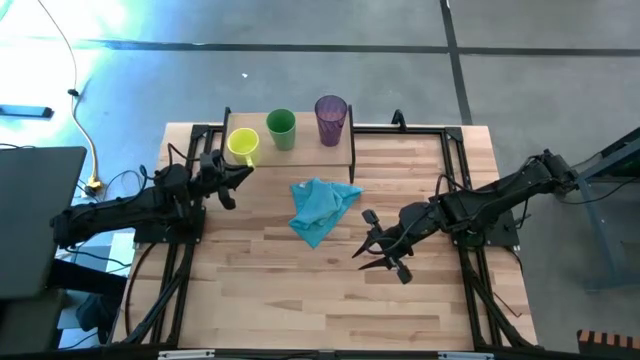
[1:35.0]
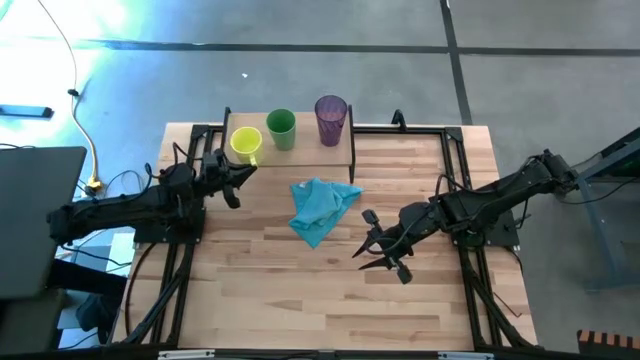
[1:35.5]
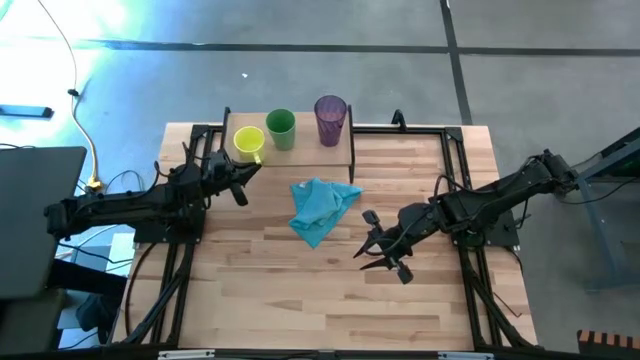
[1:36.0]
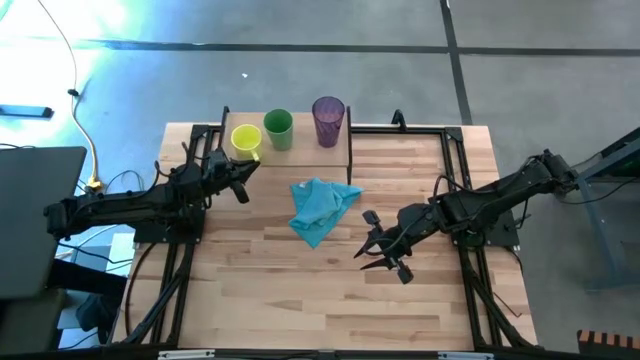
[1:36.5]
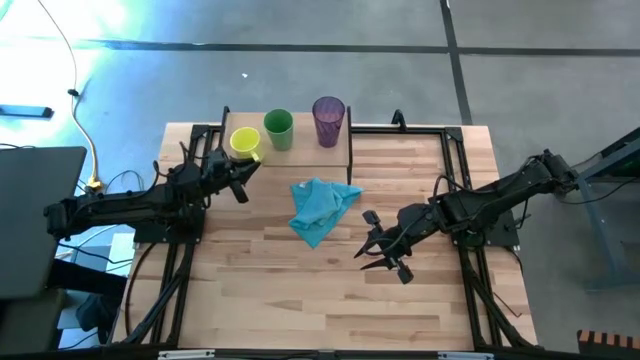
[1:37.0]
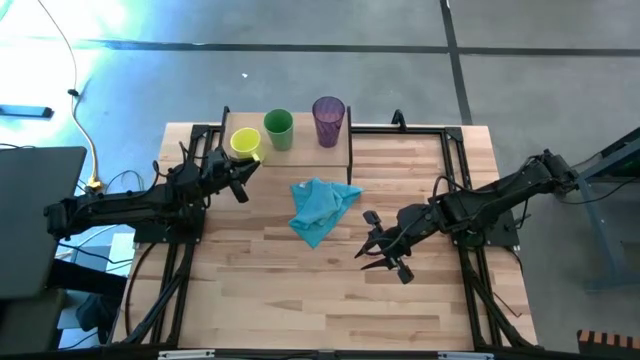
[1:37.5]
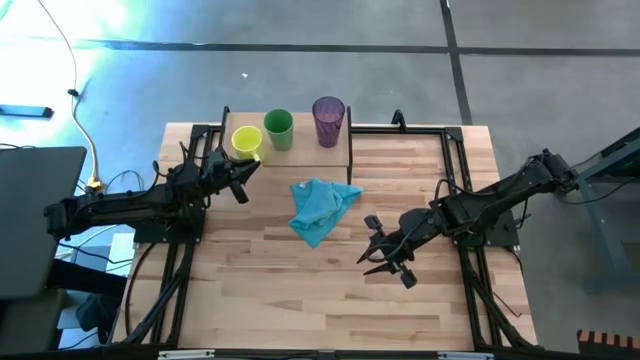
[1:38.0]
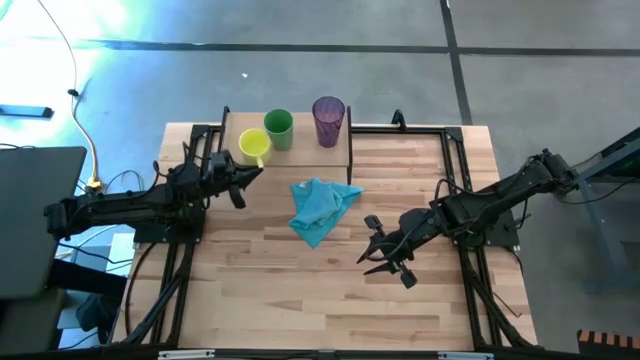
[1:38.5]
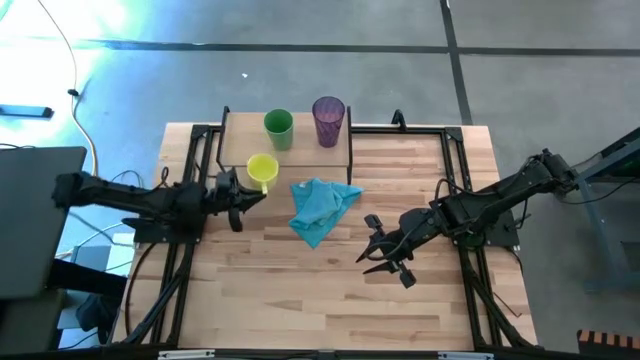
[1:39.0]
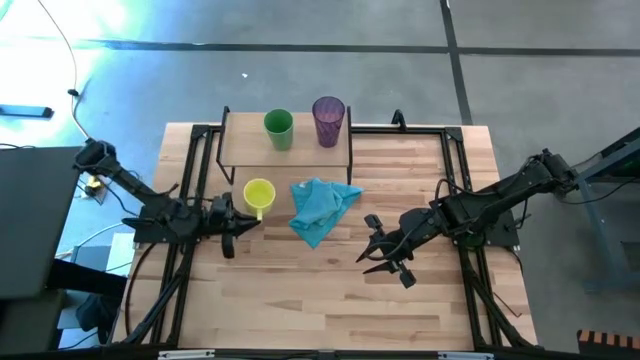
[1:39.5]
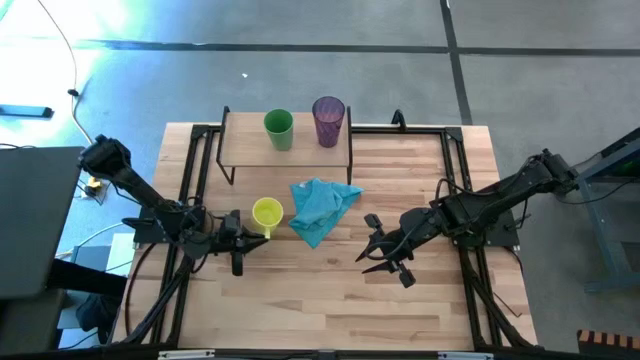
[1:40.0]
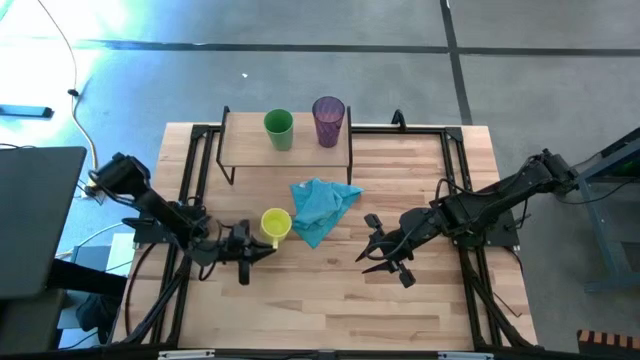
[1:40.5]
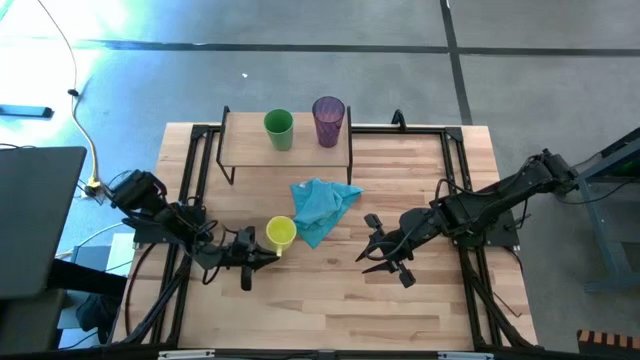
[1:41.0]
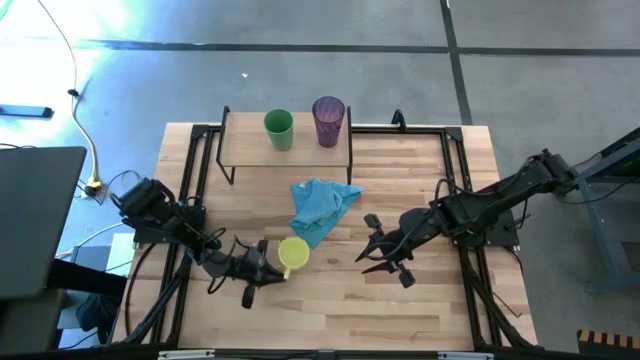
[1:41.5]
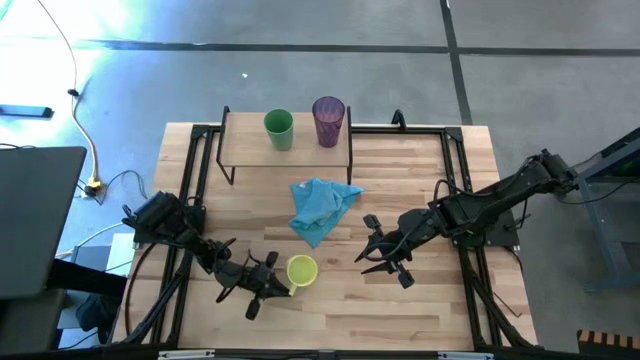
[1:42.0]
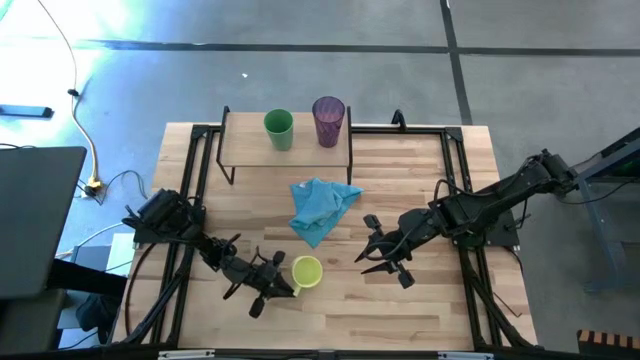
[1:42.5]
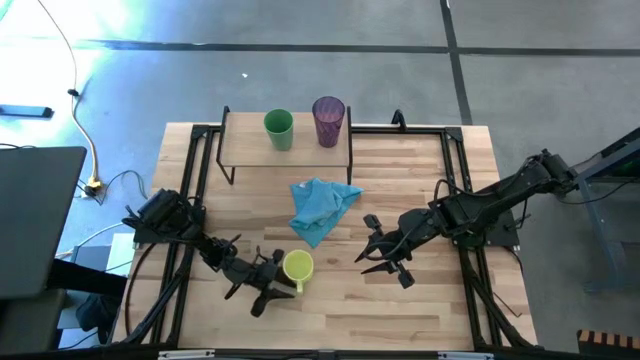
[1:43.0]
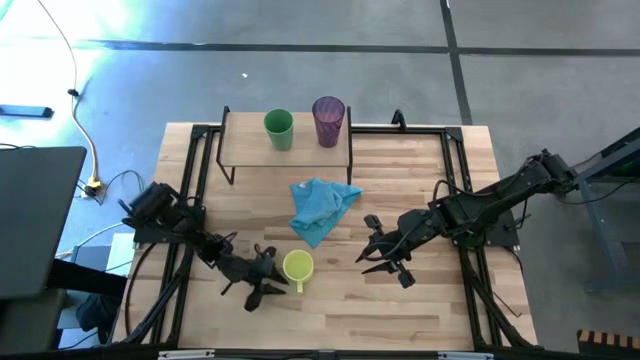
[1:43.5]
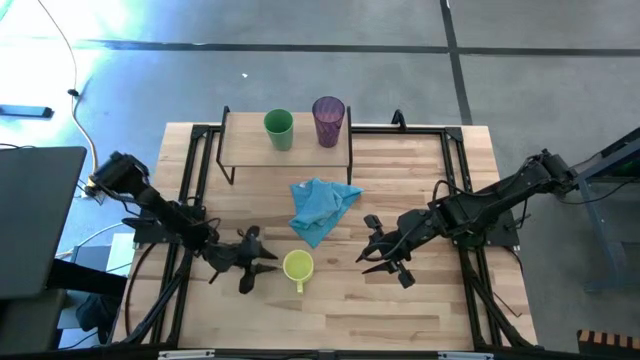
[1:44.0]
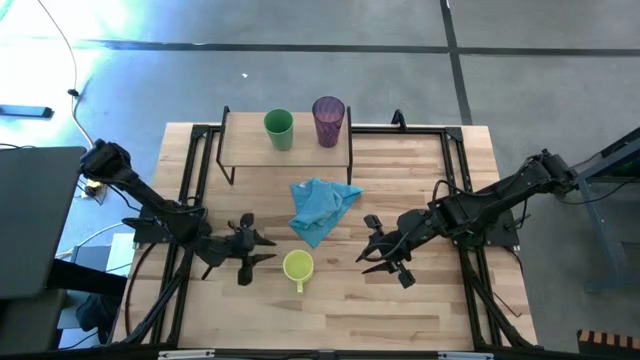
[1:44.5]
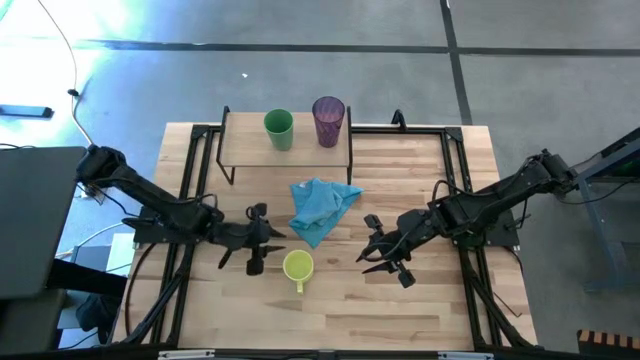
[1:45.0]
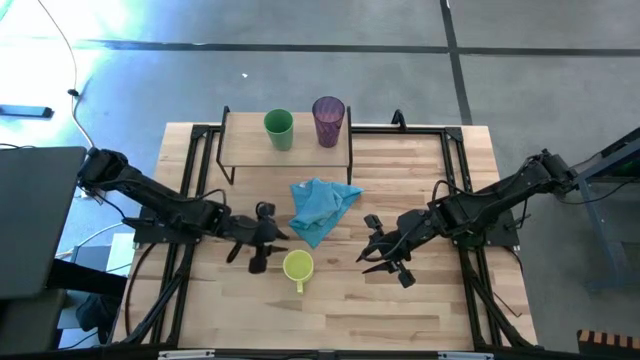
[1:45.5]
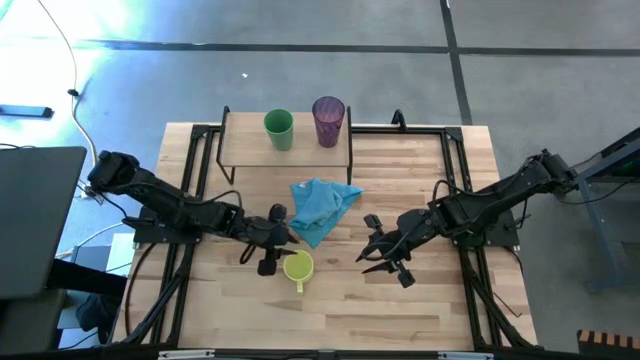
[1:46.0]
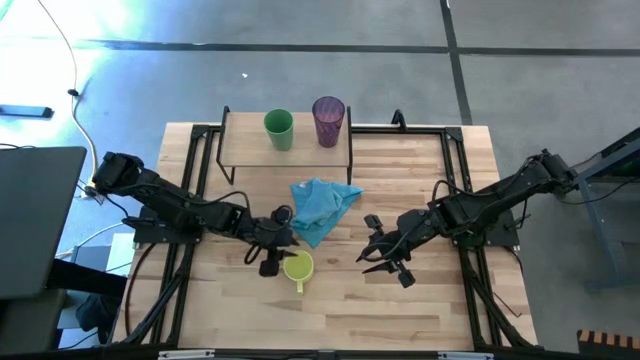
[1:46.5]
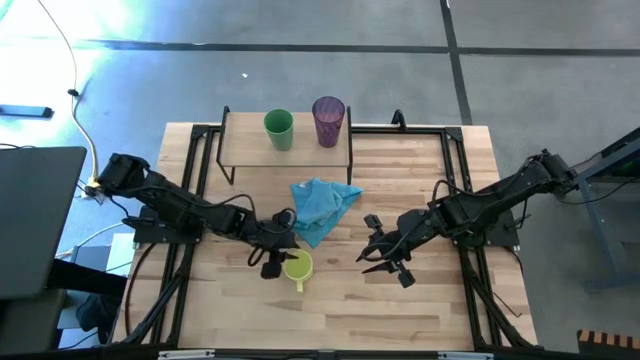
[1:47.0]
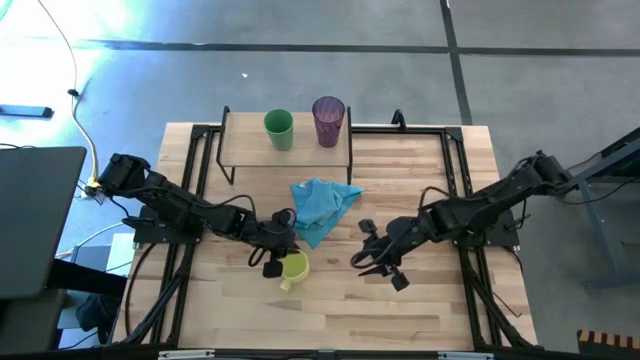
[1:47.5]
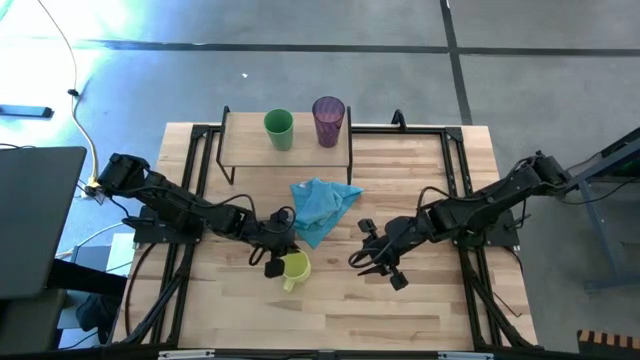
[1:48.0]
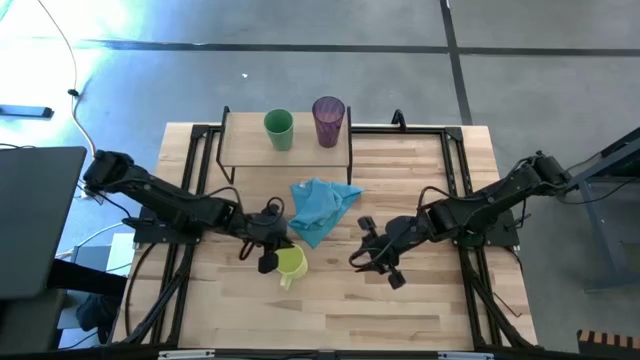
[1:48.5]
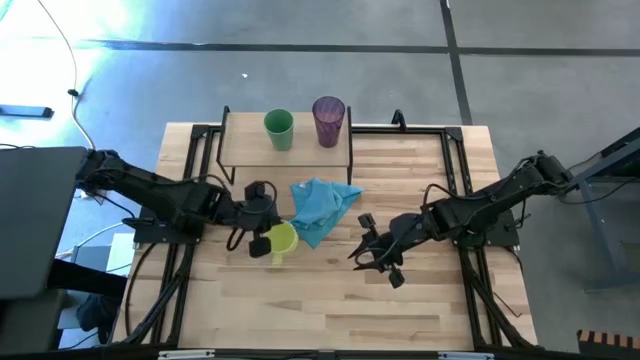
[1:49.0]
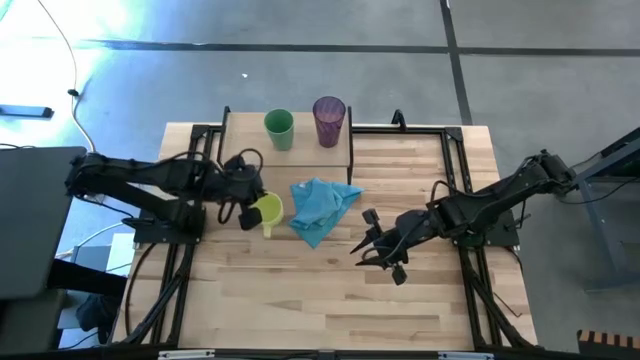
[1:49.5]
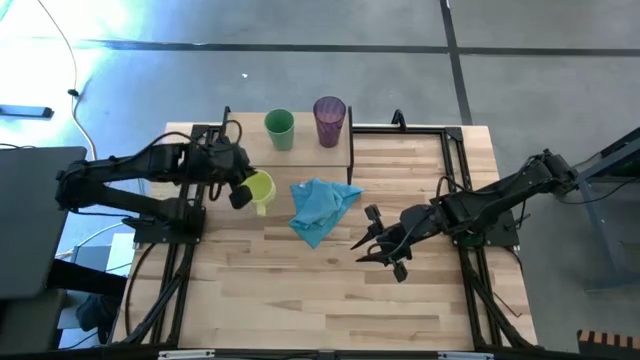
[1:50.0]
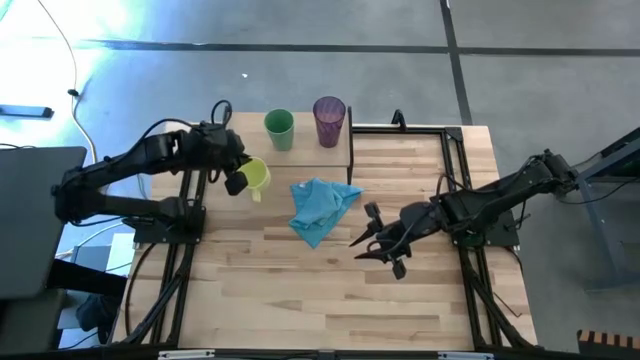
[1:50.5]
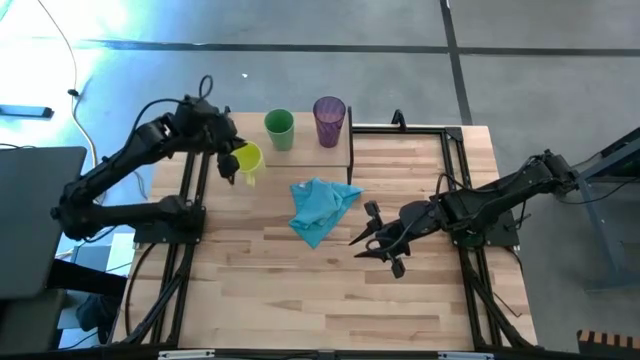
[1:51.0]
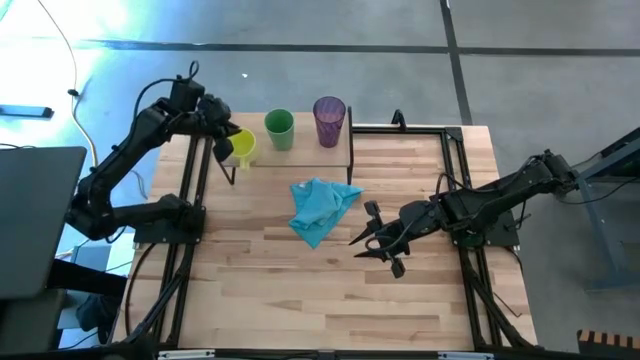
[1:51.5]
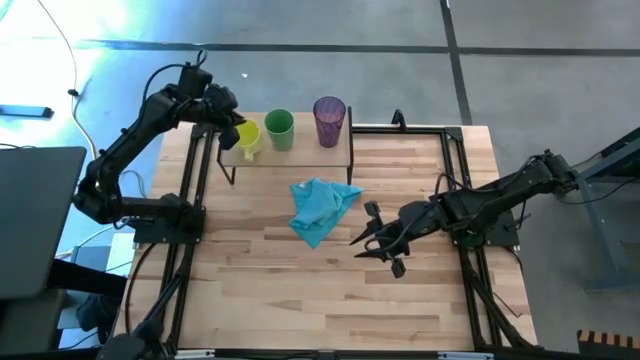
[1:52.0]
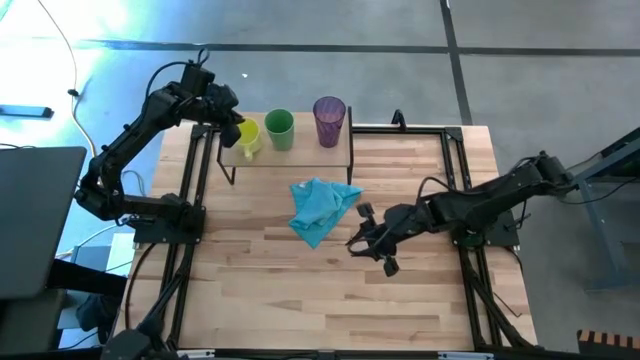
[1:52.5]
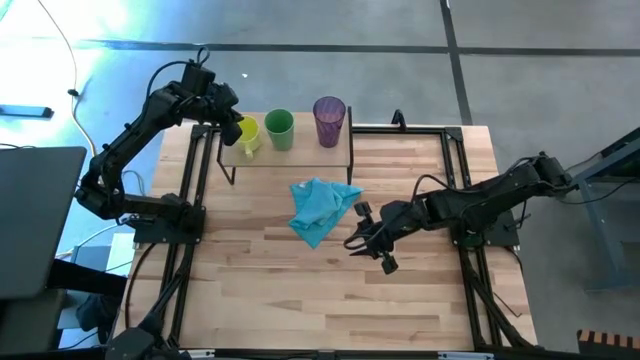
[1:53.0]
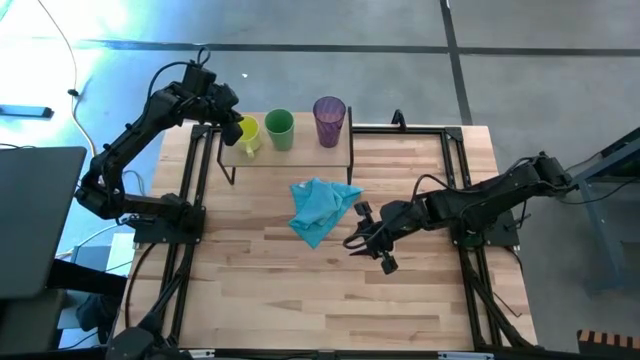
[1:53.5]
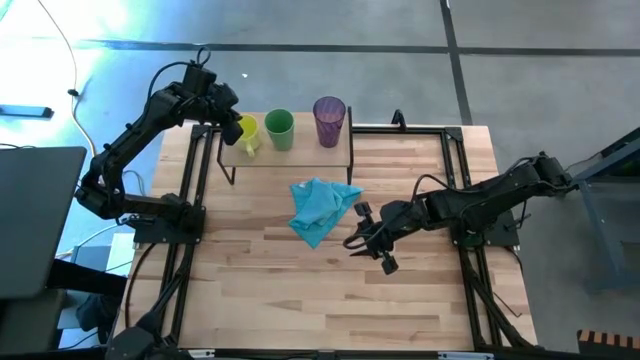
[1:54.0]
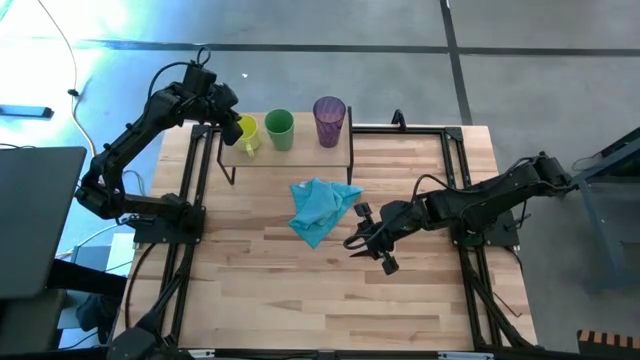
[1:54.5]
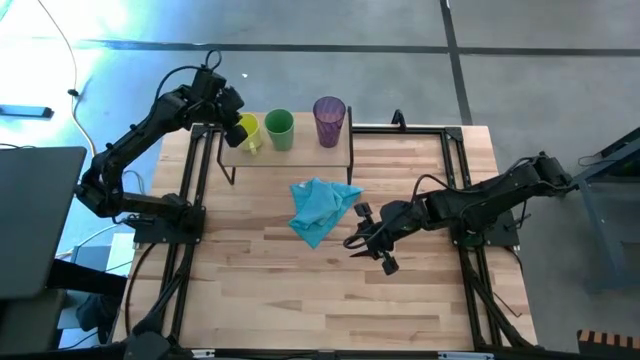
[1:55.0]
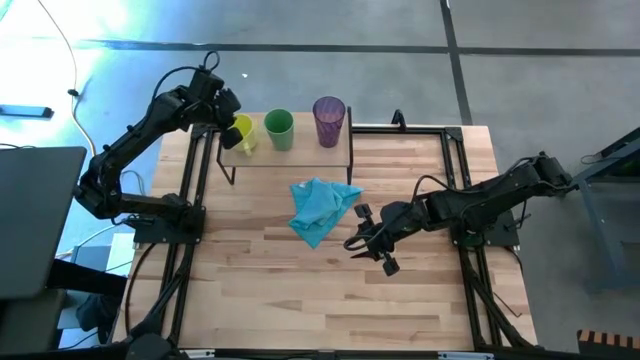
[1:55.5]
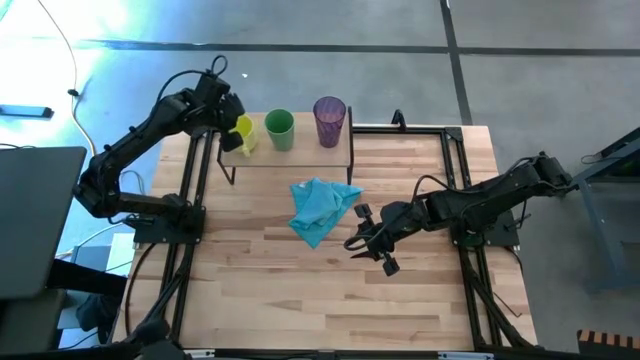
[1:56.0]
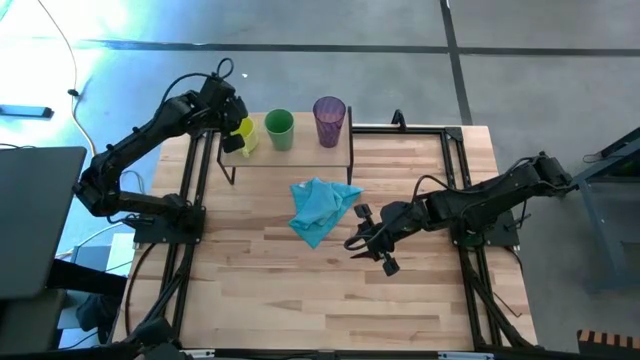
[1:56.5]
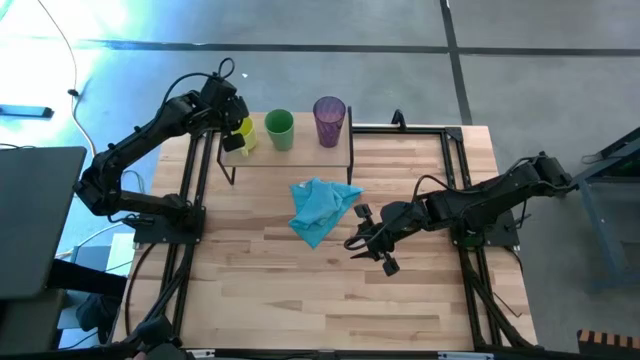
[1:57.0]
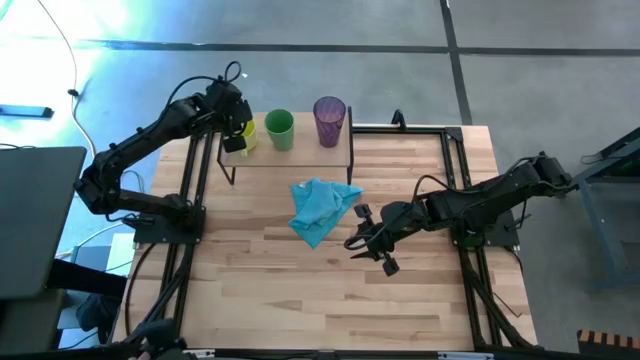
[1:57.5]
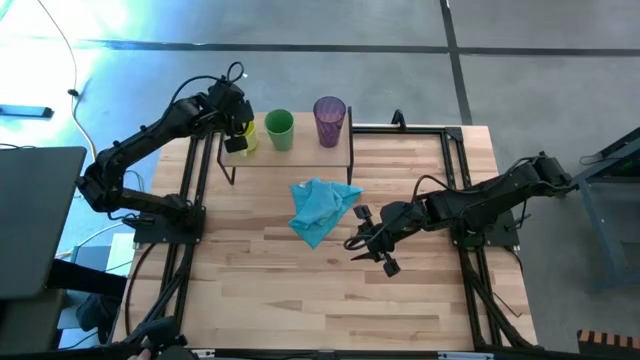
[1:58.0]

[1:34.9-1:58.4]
Task: Stack small to large cups/mugs on shelf
Put the yellow mug on the shelf
